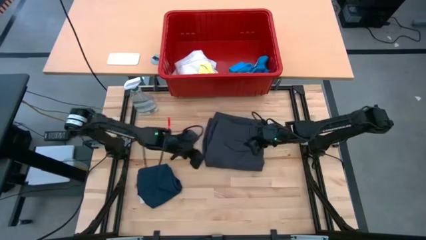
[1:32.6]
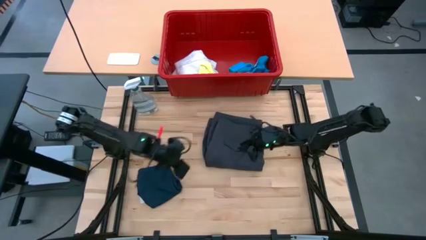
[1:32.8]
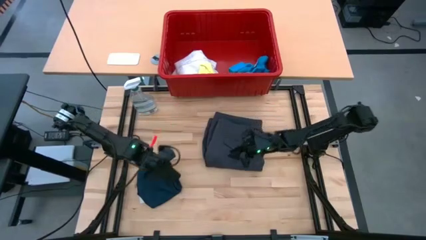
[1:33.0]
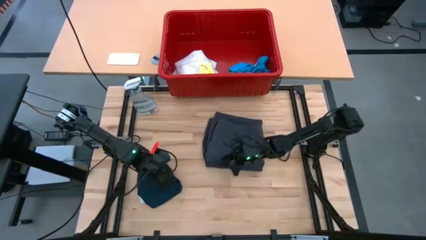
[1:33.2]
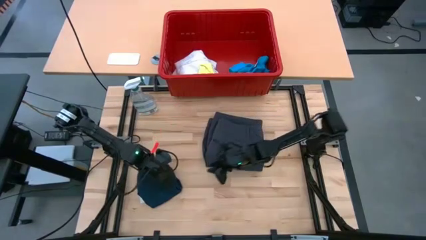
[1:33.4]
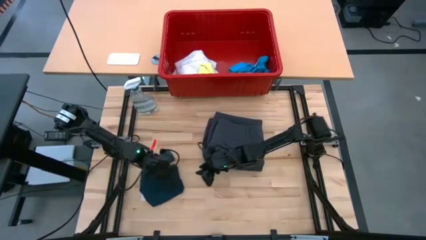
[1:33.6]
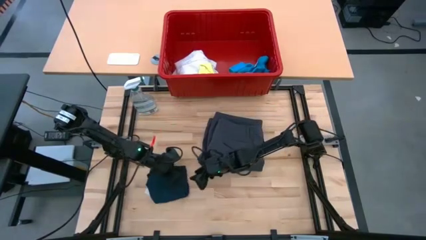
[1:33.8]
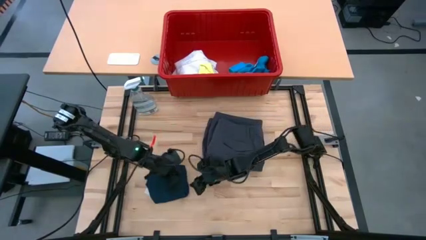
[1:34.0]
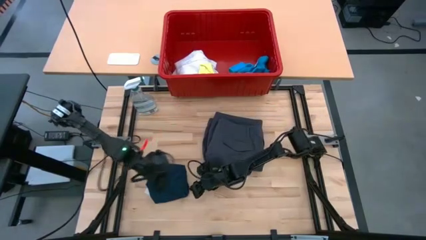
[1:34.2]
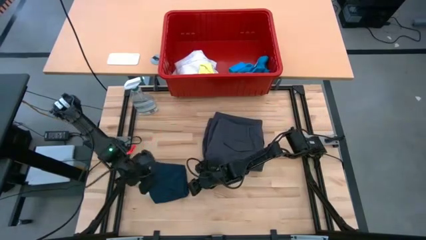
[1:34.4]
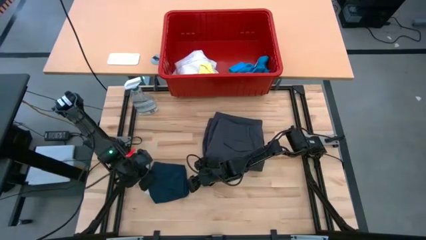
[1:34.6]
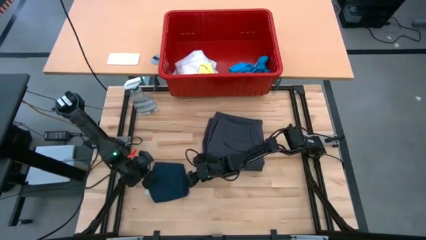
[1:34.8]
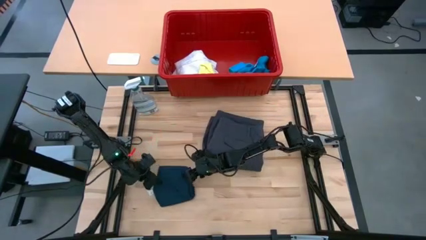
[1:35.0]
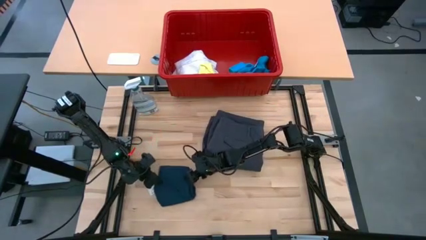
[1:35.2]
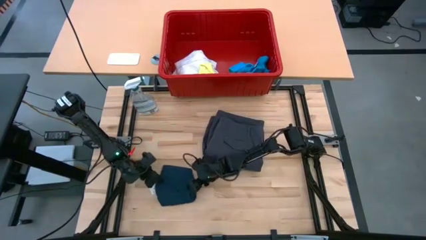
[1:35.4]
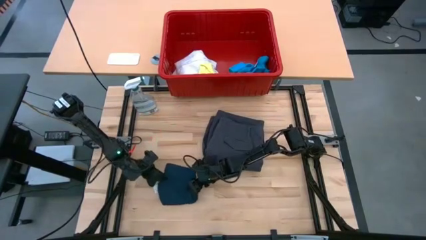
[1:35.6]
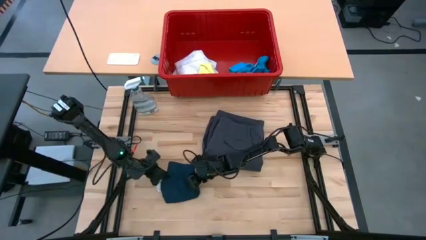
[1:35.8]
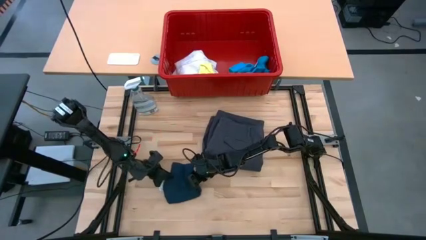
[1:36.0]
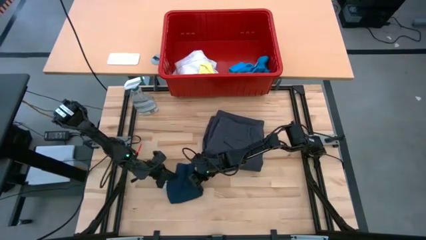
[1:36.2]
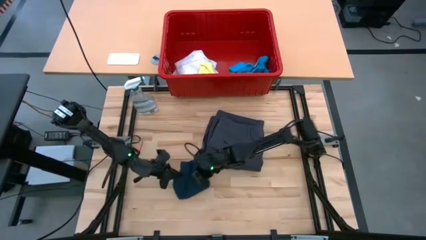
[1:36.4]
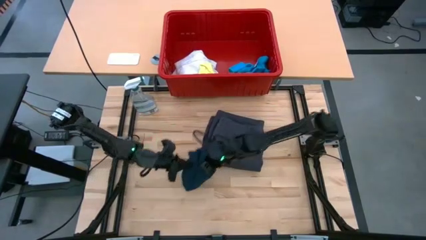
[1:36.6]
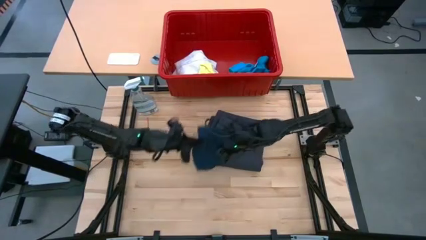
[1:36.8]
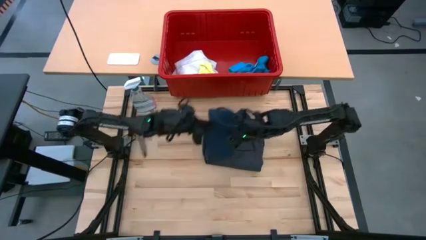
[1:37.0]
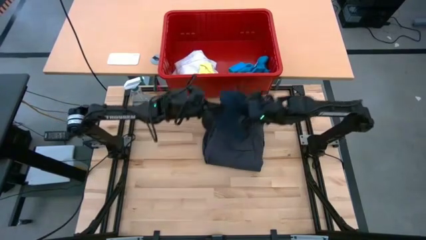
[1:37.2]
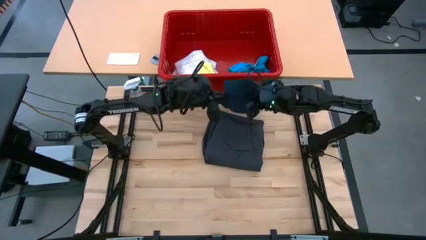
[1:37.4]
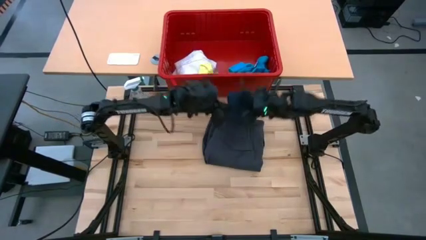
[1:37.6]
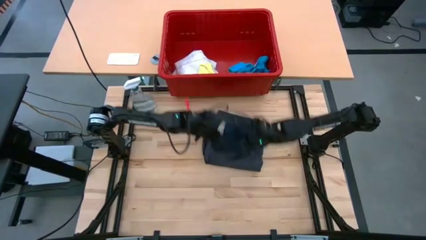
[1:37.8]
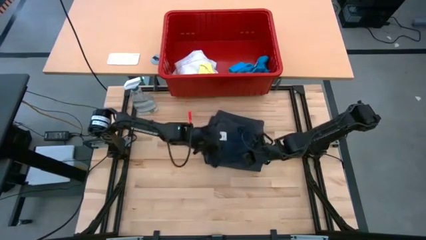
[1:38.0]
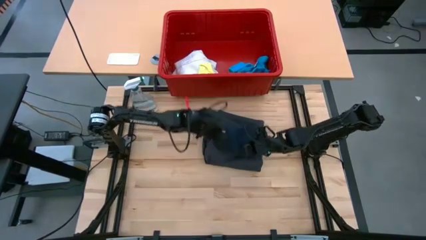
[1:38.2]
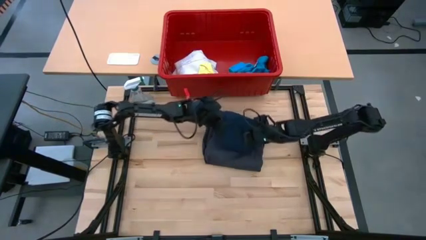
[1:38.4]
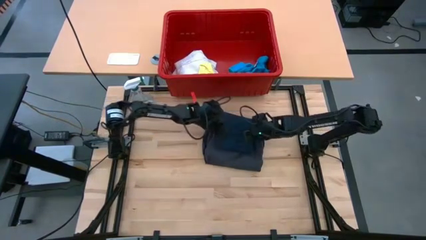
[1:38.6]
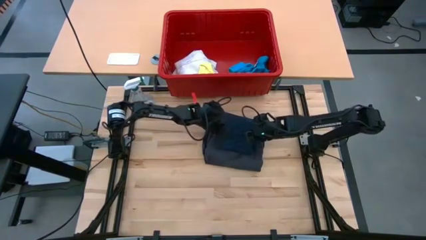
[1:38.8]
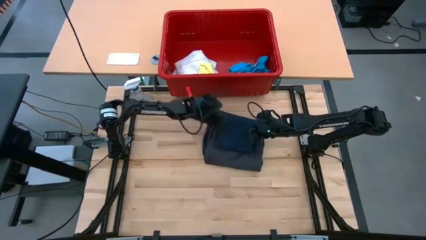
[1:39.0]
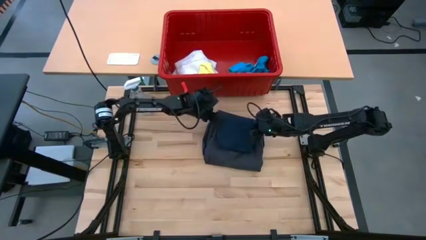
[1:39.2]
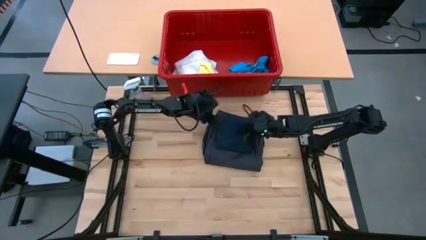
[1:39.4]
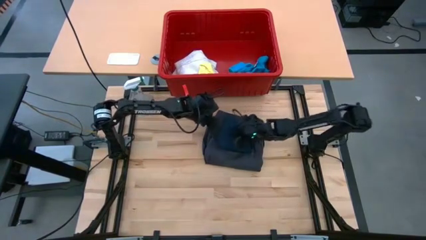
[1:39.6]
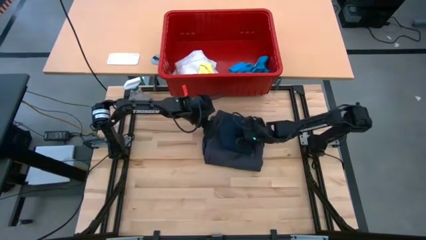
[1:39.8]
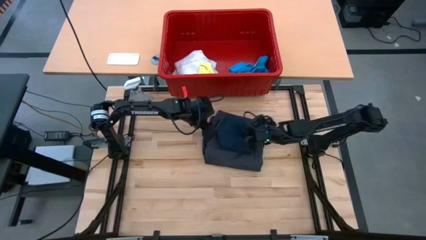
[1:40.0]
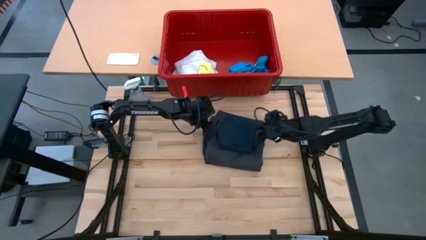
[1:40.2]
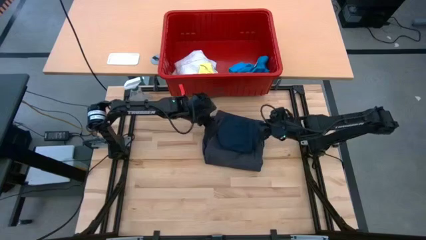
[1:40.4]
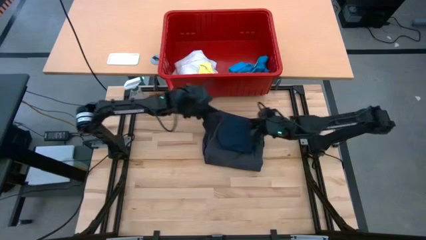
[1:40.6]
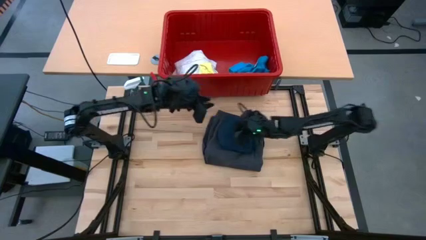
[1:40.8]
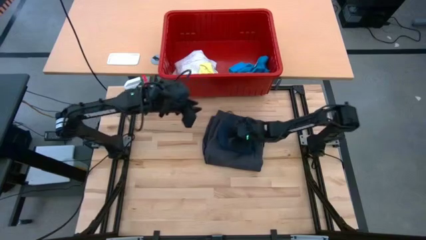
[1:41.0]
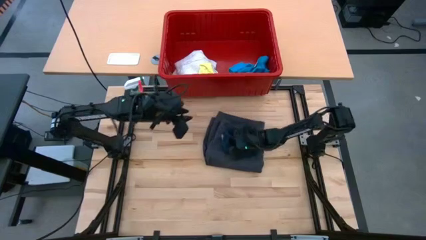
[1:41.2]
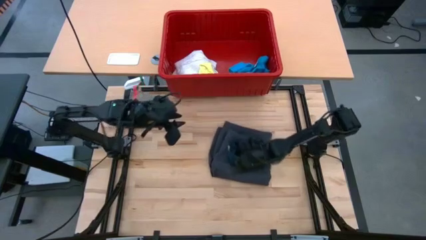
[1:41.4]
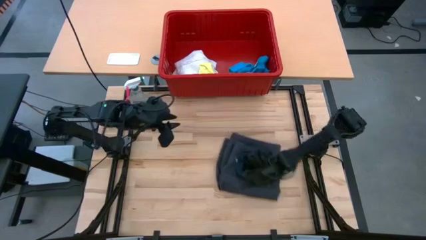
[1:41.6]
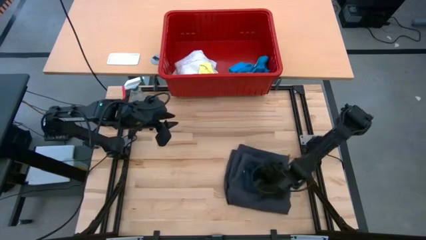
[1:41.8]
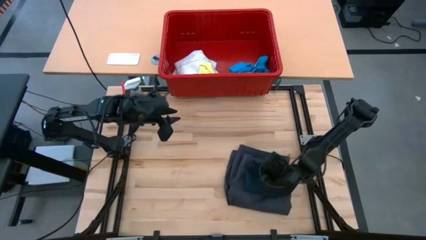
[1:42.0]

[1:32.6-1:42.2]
Task: Fold laundry
Stack the dark blue shorts on top of the black shorts

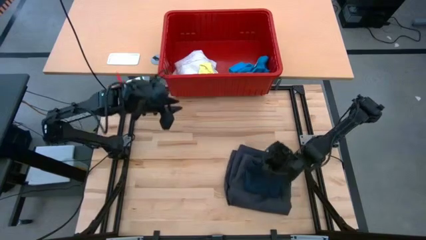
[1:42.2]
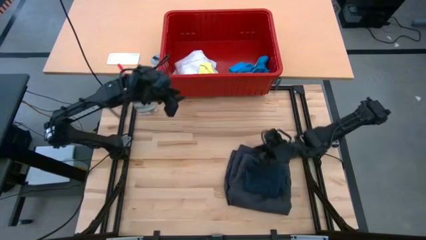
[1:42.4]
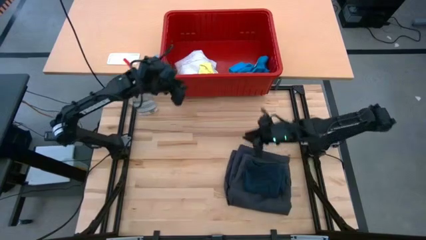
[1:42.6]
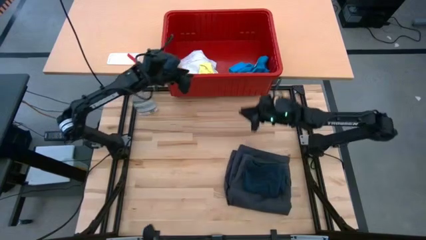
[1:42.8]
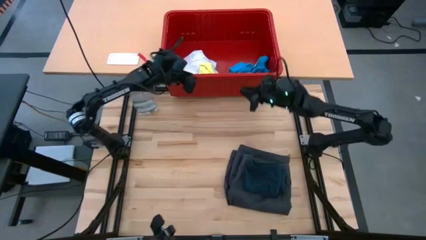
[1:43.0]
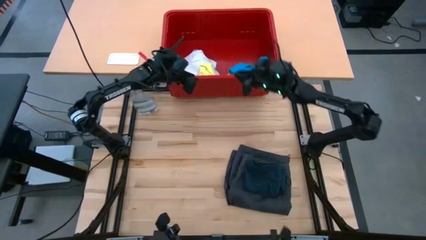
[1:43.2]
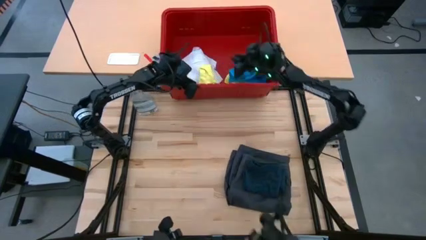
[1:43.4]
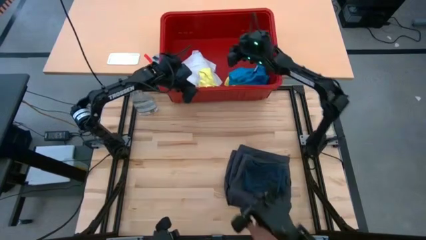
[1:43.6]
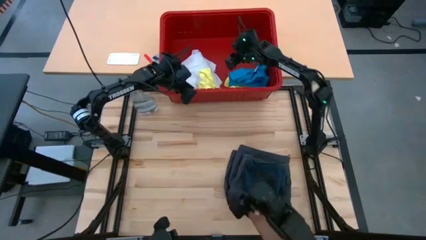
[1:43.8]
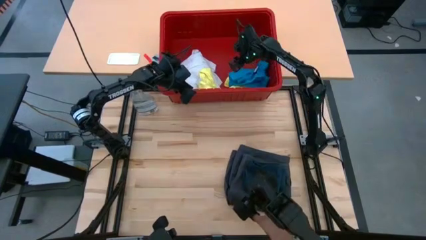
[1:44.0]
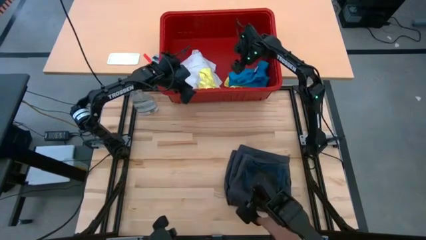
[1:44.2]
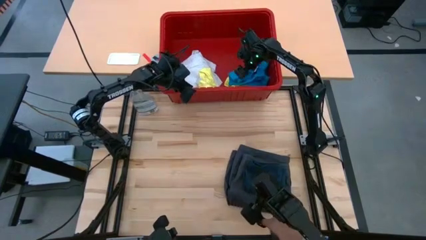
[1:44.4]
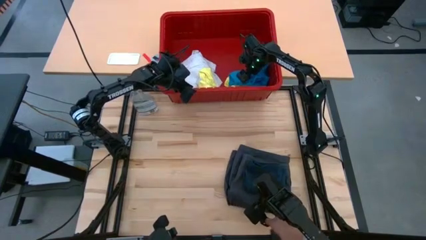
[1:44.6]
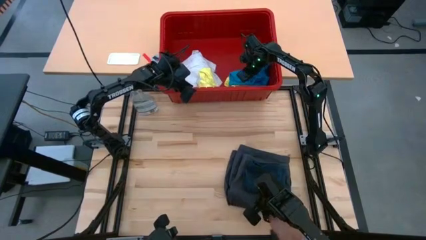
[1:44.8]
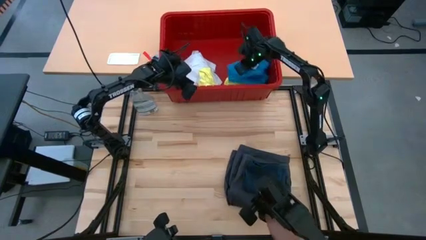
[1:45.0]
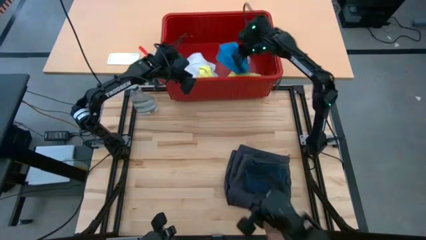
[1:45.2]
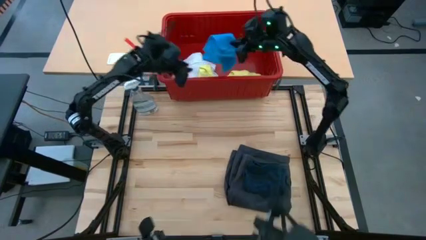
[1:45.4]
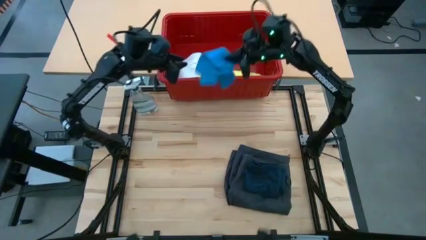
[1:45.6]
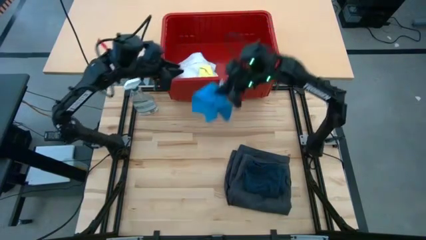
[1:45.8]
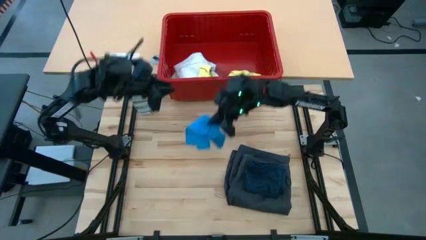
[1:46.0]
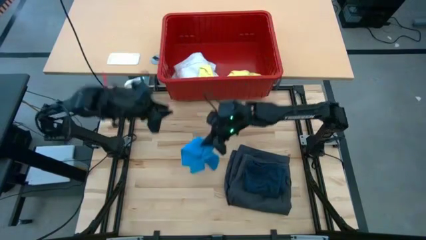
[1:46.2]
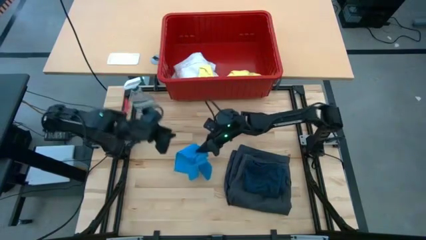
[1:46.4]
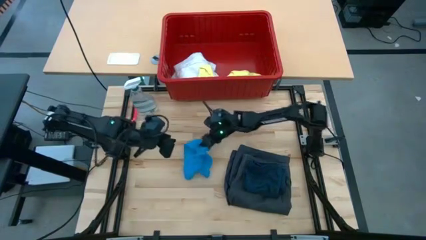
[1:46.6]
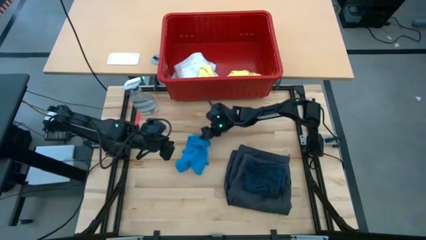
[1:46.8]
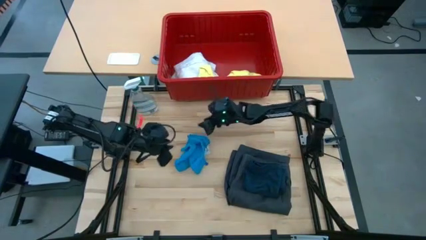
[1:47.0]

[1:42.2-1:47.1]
Remove the blue shorts from the red laundry bin
